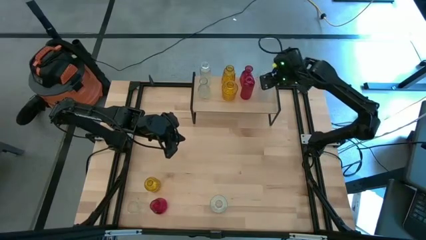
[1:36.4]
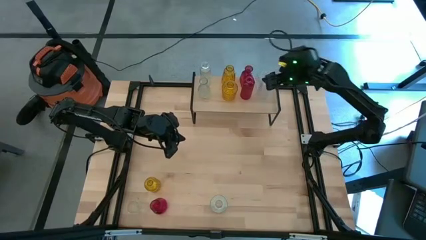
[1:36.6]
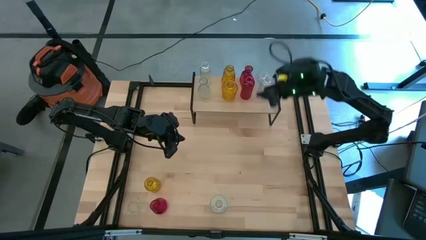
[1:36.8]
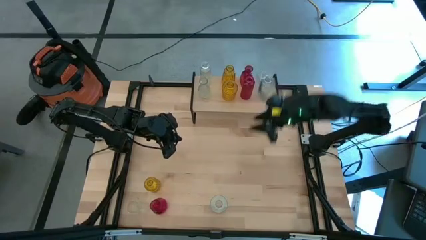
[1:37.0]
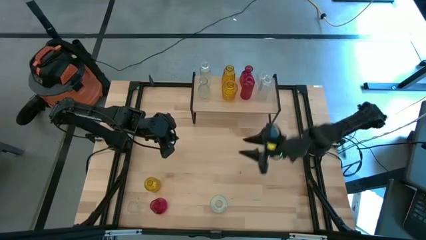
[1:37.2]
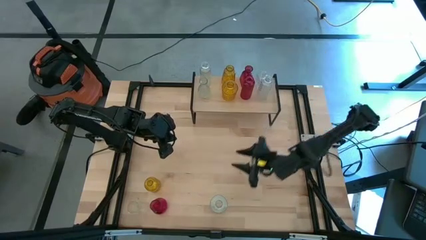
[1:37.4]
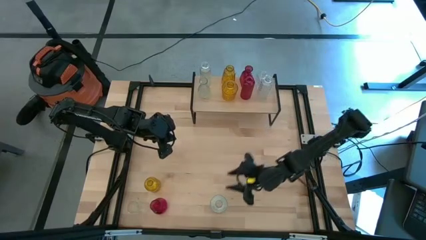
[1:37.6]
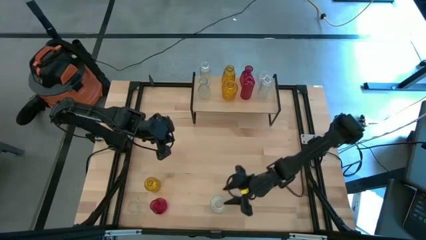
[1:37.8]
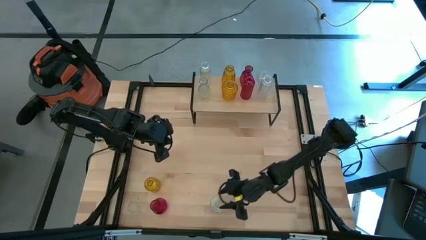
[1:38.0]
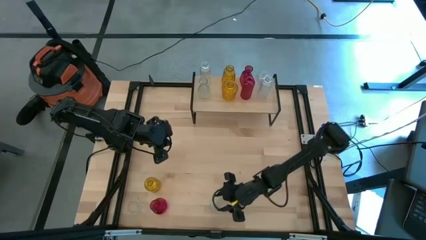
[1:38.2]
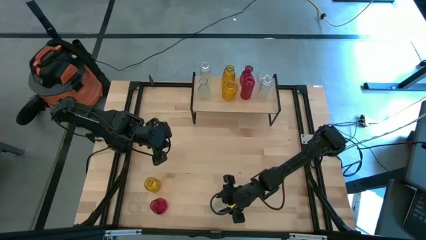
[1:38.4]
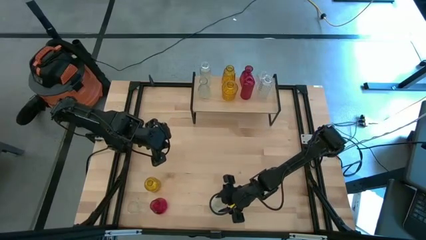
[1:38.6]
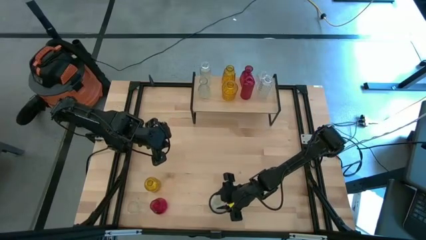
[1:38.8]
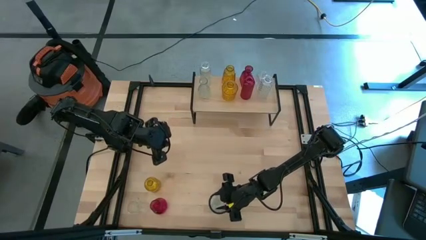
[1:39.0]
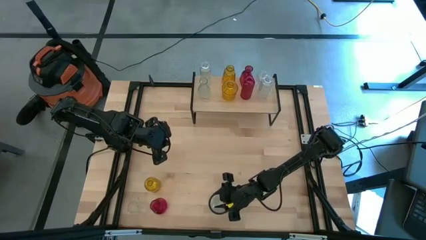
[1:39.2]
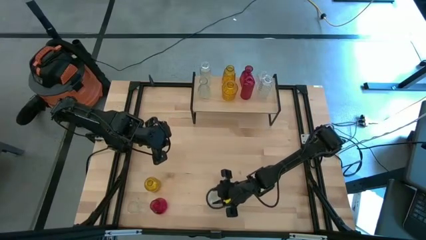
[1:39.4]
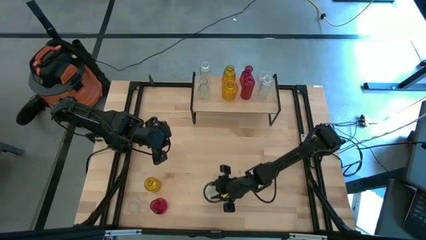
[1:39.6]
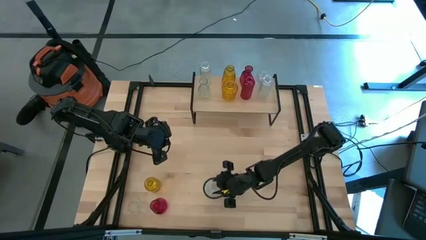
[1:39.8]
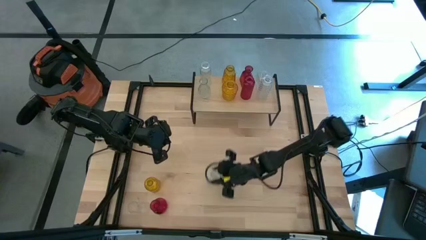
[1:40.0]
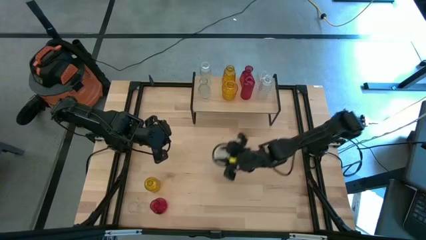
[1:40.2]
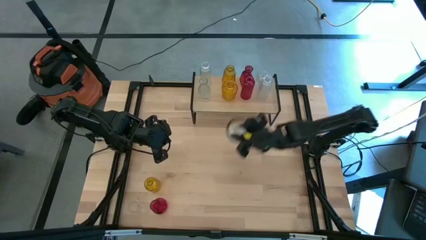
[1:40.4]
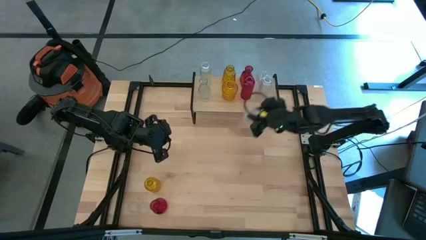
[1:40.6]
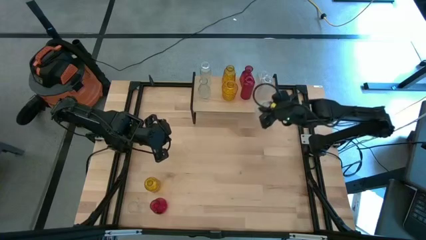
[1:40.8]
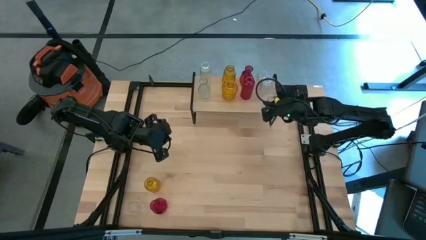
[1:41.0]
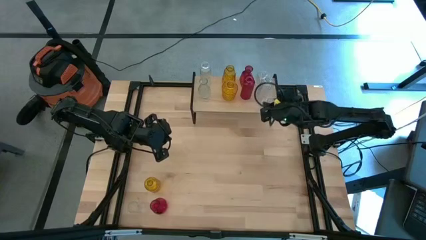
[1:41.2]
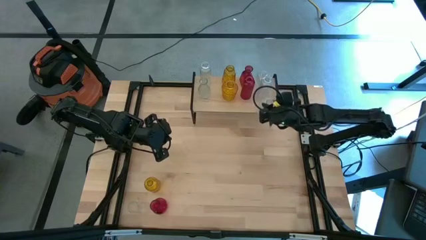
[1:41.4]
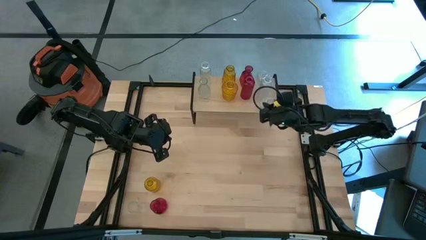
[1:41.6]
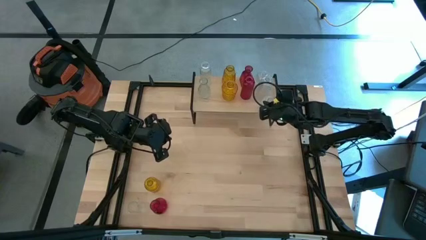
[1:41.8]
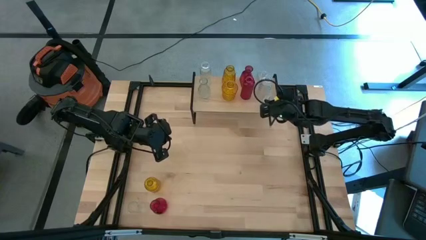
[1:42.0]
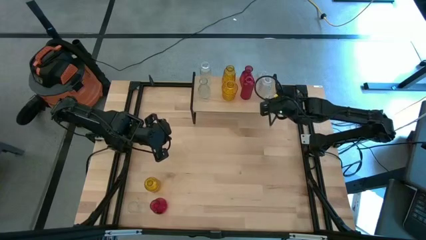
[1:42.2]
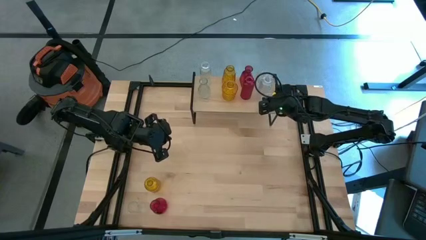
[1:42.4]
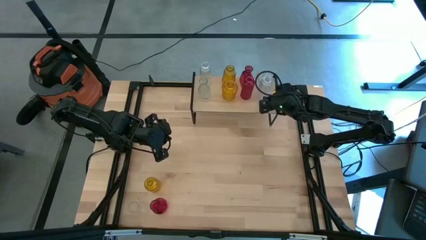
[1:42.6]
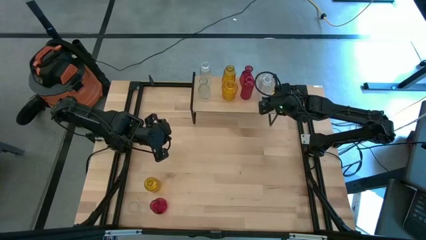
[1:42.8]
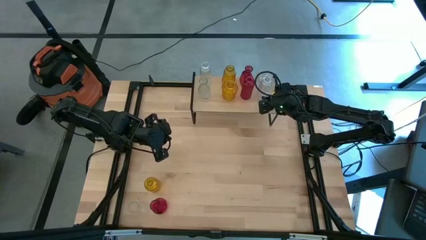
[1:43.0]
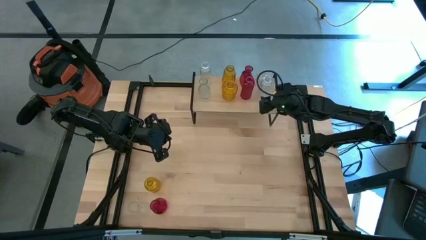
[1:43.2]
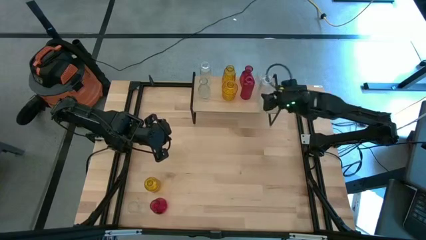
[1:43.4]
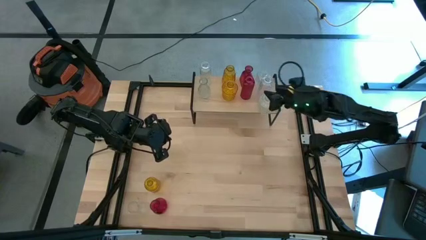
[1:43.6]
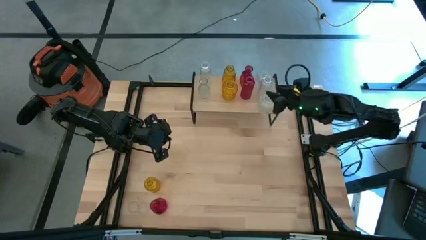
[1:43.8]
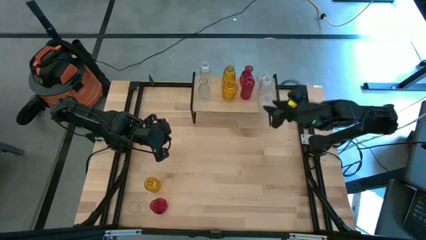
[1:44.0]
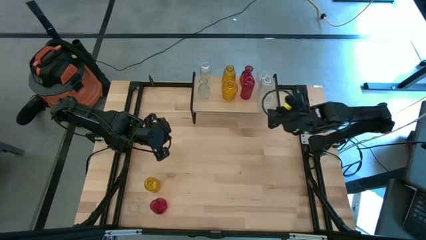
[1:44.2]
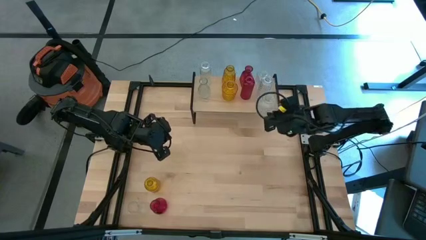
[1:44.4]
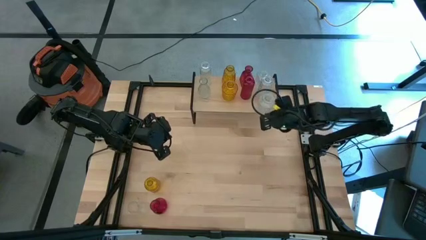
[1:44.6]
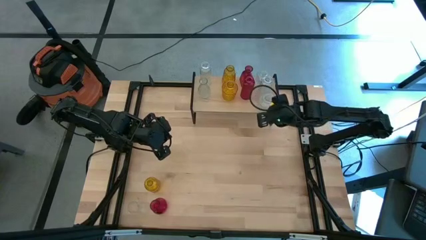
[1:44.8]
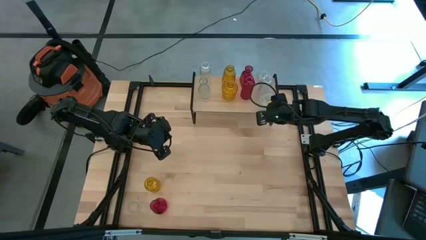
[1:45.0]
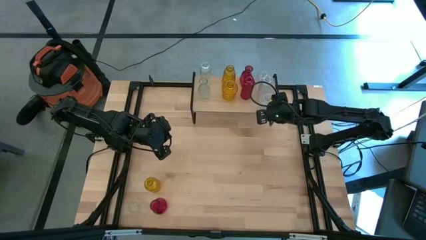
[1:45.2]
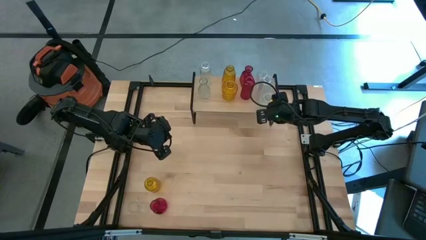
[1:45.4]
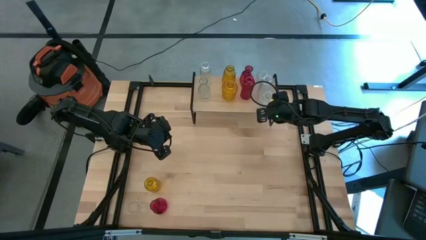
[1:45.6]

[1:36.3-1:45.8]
Task: sort vases onto shelf
Put the transparent vase on the shelf aligned with the other transparent vase

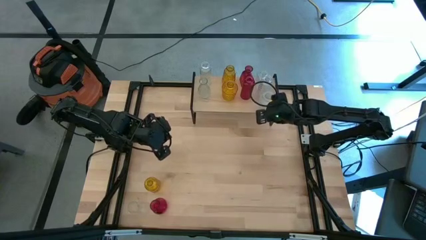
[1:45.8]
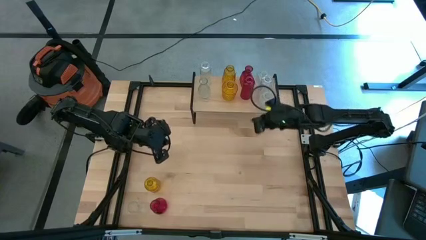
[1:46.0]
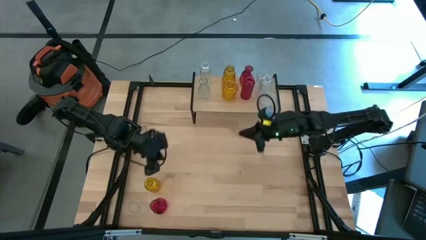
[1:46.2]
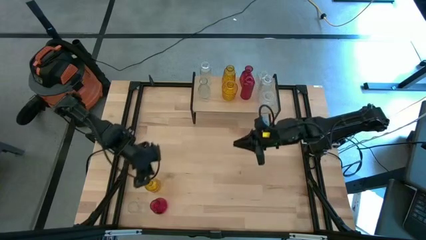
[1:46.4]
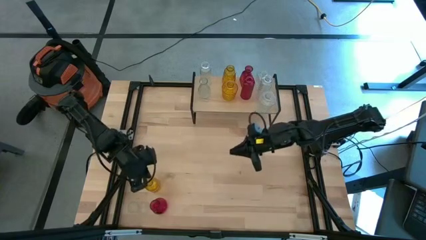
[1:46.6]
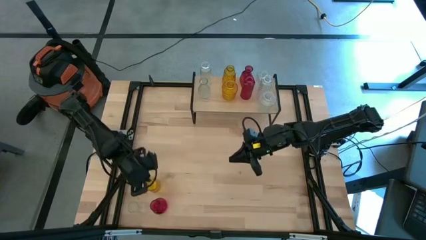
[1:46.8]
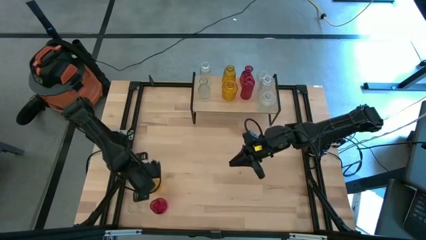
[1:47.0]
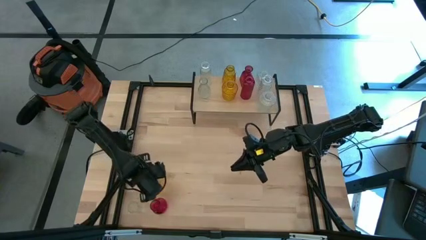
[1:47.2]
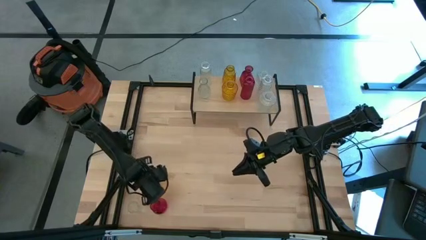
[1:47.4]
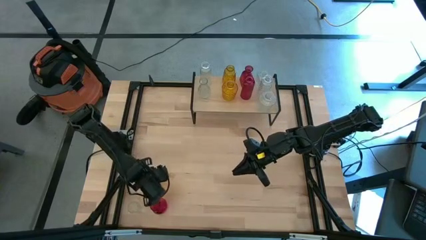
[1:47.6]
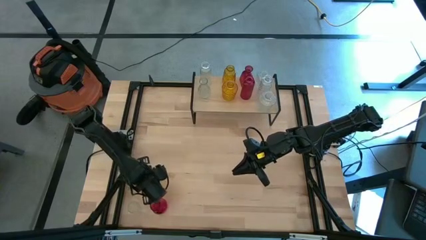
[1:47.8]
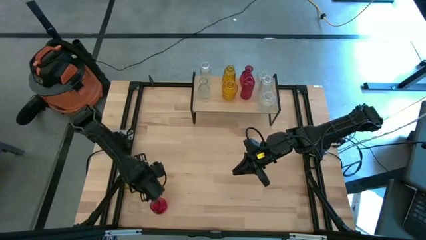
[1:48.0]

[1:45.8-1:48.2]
Put the yellow vase on the shelf aligned with the other yellow vase
